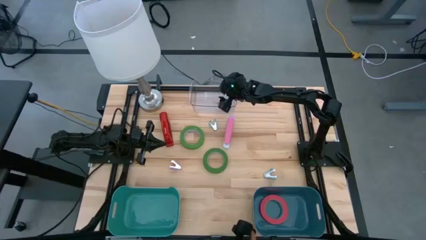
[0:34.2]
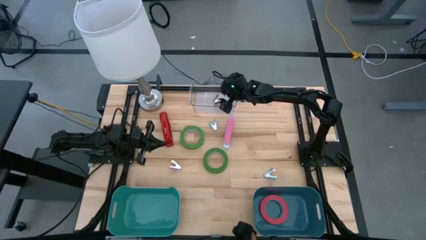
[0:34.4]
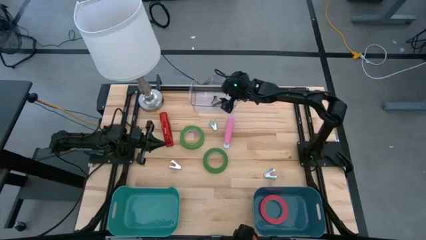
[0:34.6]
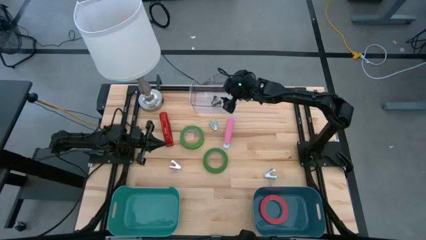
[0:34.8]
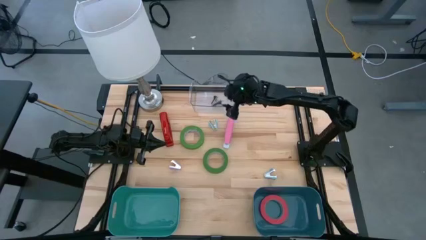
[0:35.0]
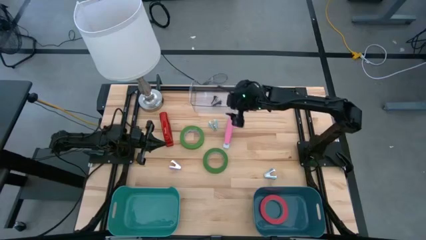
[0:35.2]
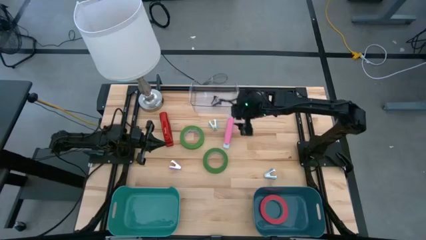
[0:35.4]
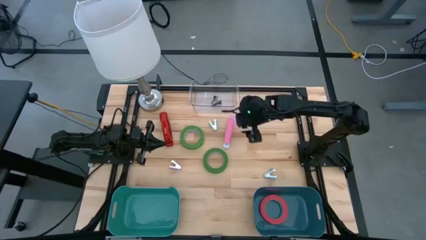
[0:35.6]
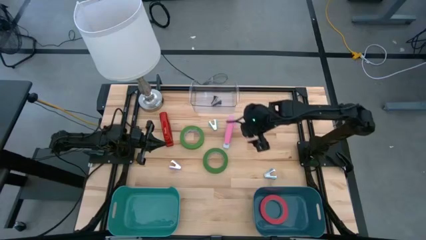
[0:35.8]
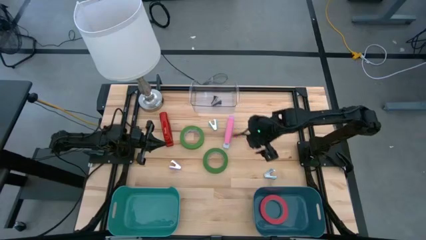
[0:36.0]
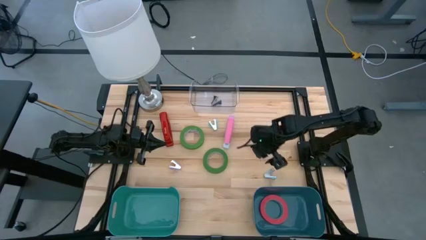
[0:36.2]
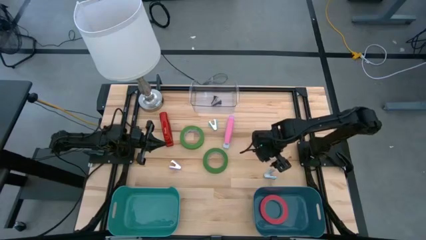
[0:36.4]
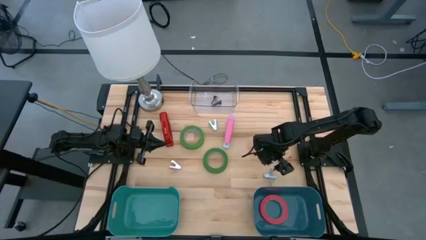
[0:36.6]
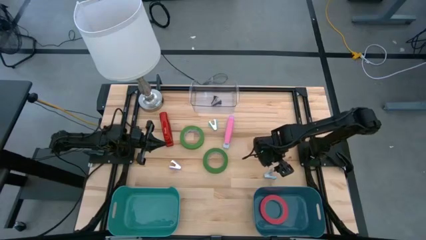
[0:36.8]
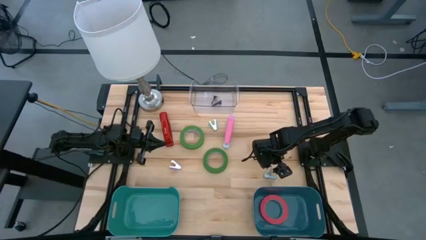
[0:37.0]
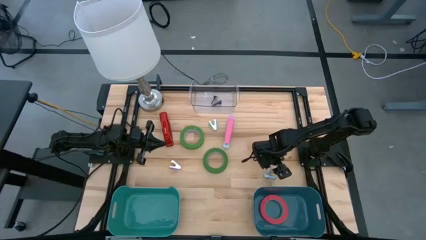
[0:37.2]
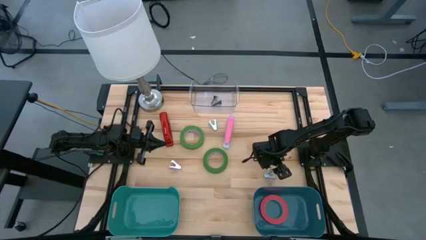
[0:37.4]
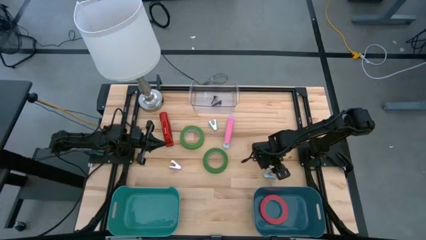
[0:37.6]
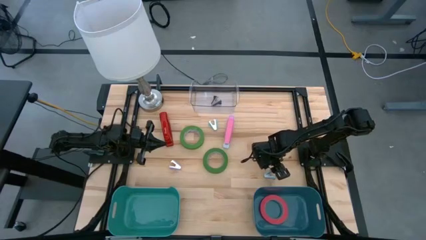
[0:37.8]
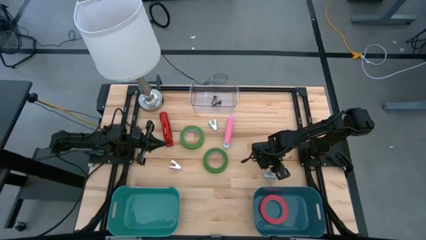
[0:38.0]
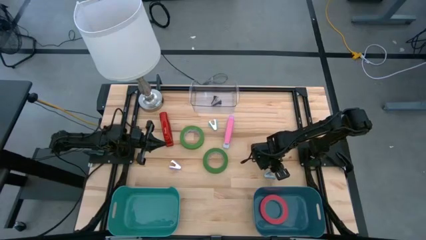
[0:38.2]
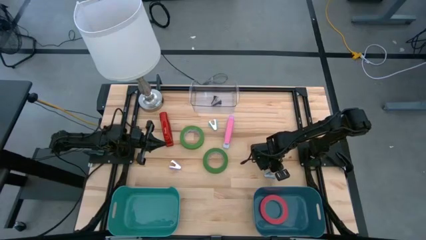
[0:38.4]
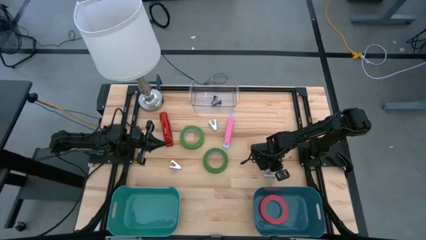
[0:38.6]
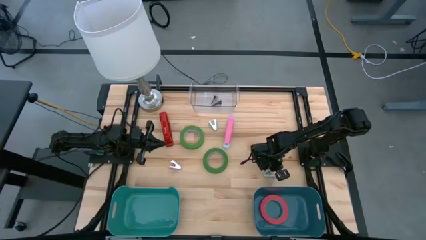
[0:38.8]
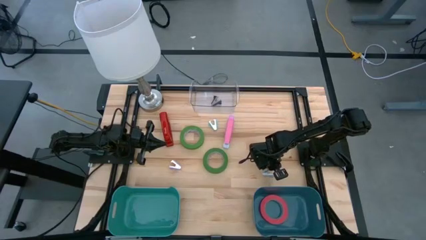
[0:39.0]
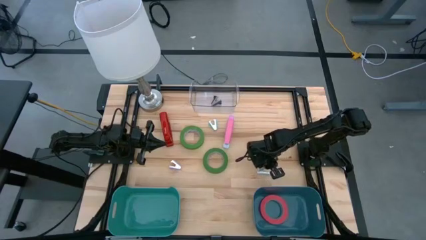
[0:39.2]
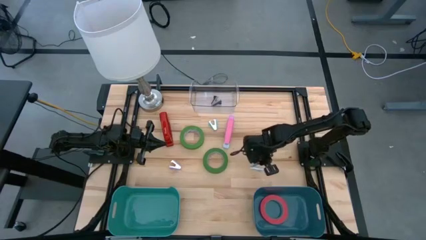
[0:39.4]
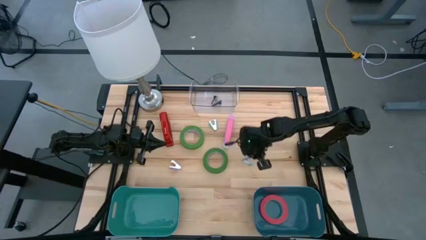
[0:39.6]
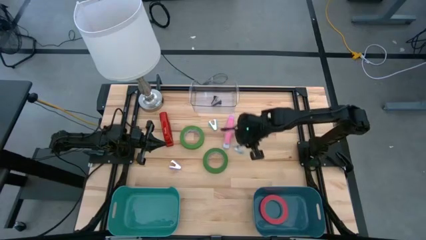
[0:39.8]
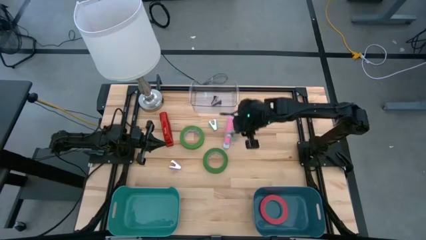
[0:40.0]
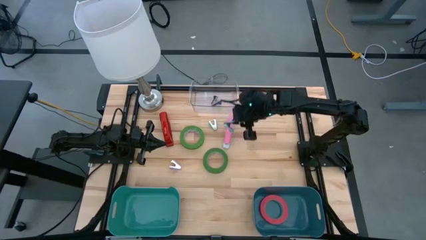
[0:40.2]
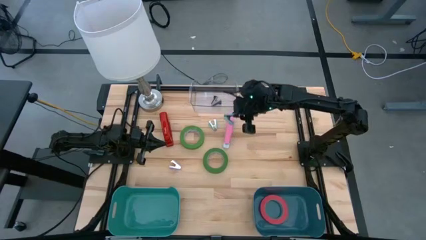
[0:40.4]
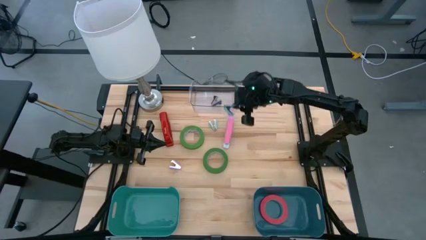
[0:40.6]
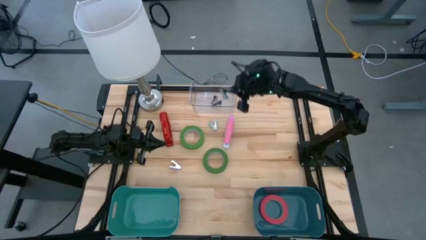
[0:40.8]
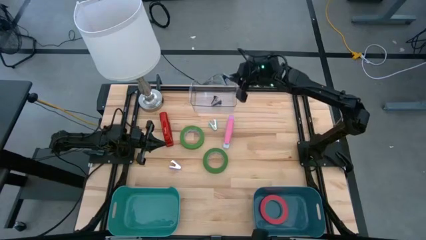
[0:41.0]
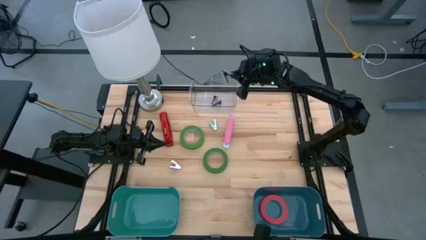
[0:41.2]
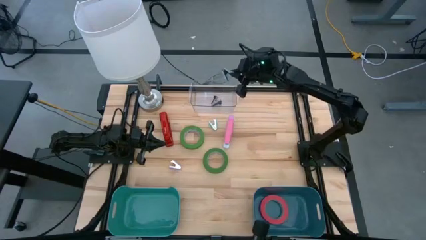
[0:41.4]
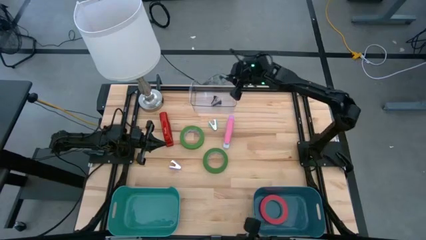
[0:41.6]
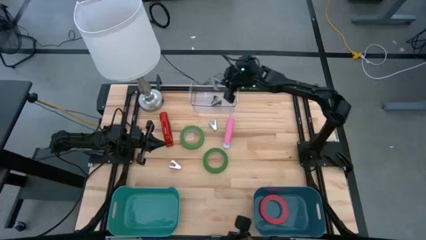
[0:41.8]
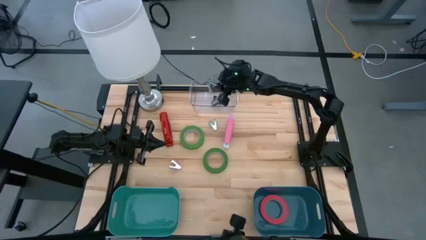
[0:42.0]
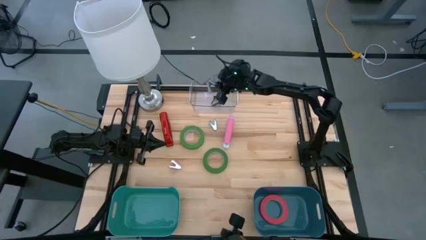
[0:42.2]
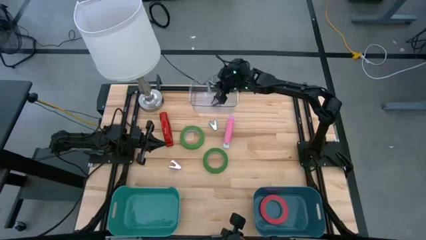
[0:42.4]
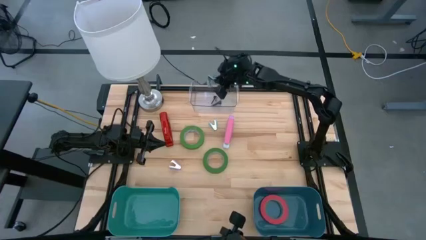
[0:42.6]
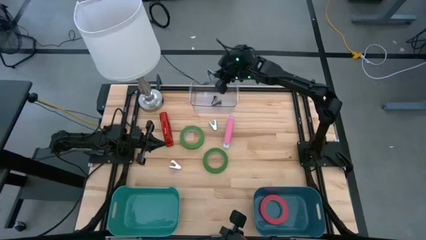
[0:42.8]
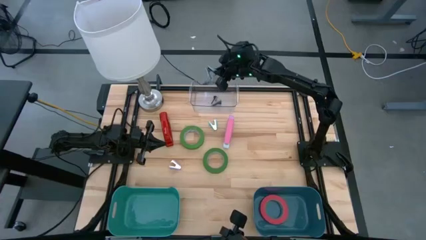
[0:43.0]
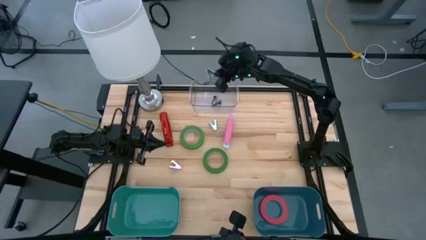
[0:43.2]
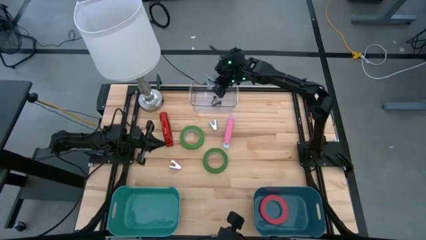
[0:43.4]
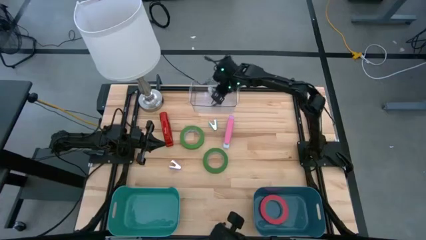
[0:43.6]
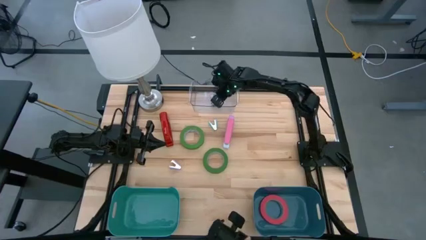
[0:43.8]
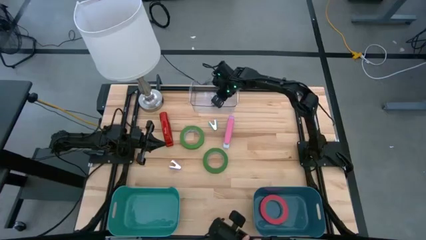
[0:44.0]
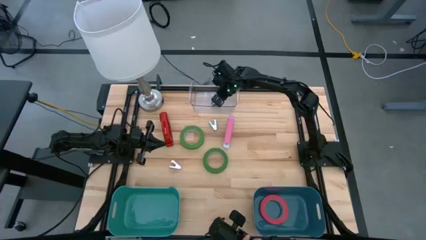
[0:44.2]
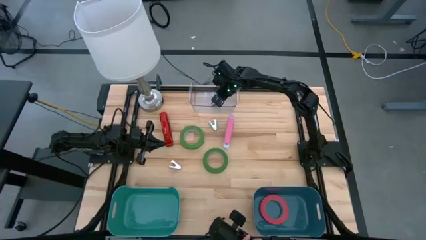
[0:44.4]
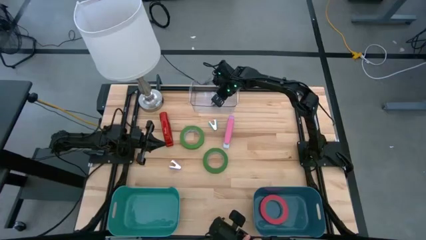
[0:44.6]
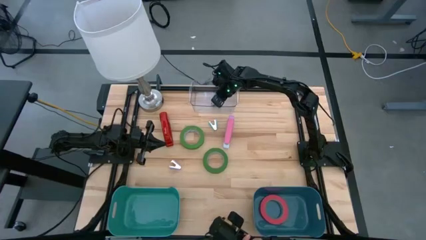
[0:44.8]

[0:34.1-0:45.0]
Task: Pick and place Stapler, Stapler remover, tape
Put the light blue staple remover into the transparent bin
